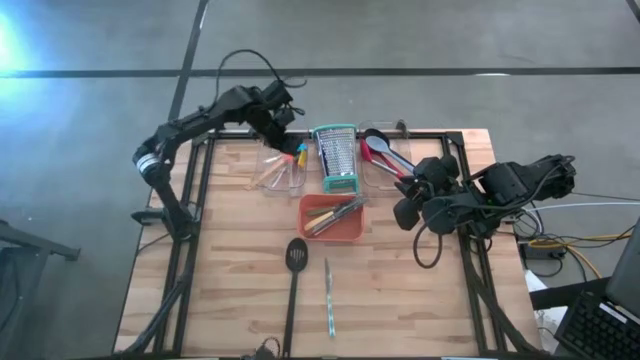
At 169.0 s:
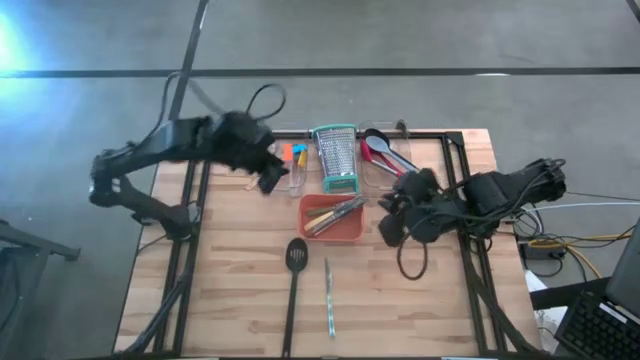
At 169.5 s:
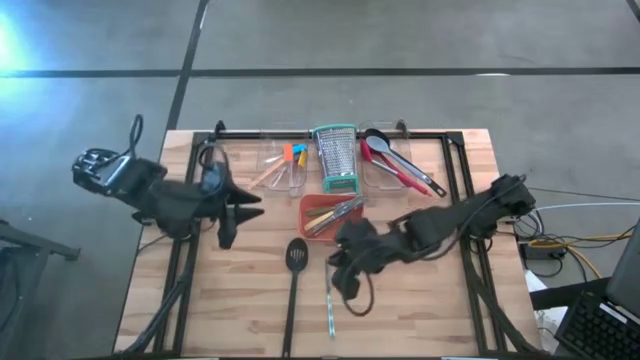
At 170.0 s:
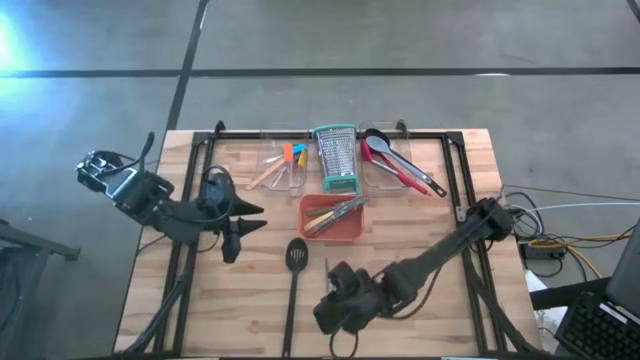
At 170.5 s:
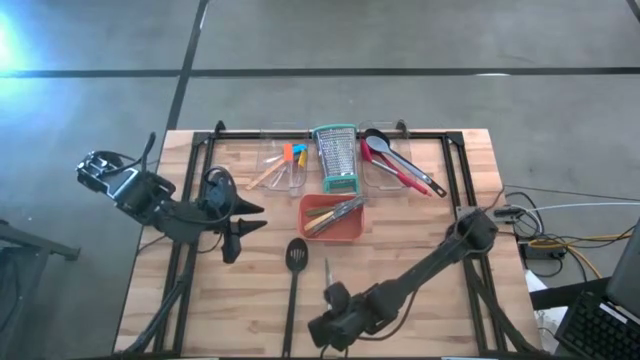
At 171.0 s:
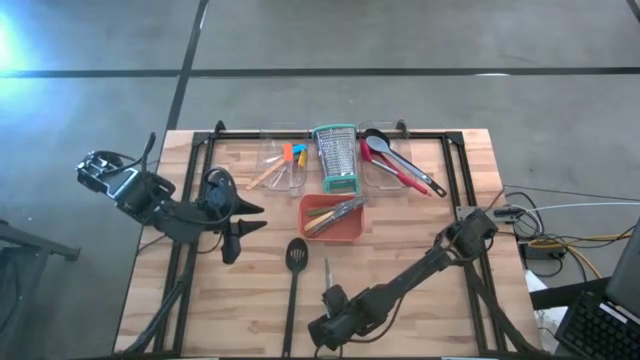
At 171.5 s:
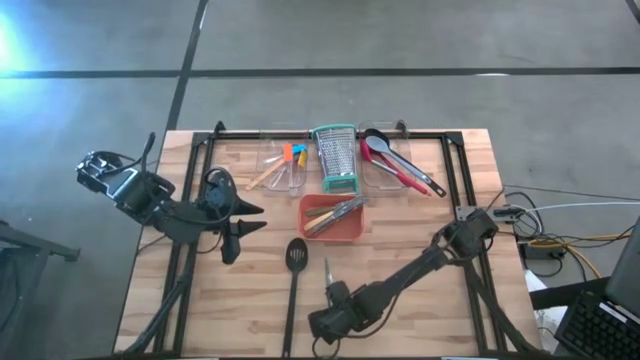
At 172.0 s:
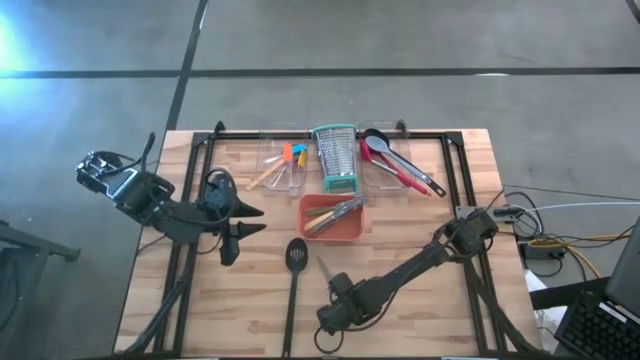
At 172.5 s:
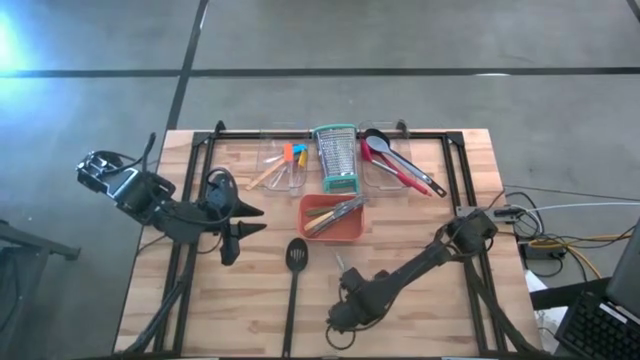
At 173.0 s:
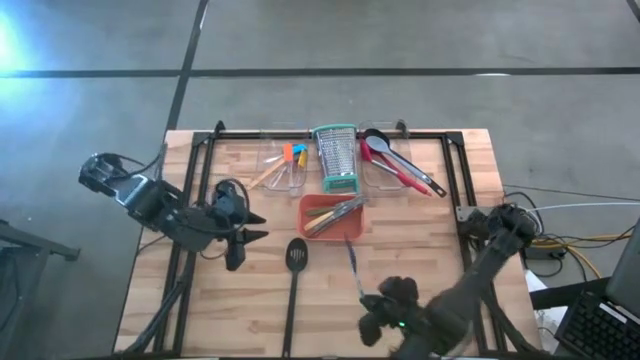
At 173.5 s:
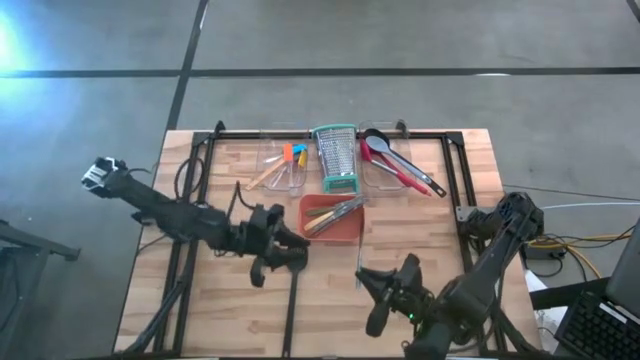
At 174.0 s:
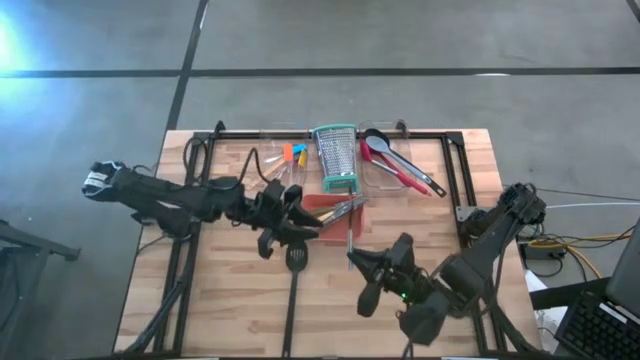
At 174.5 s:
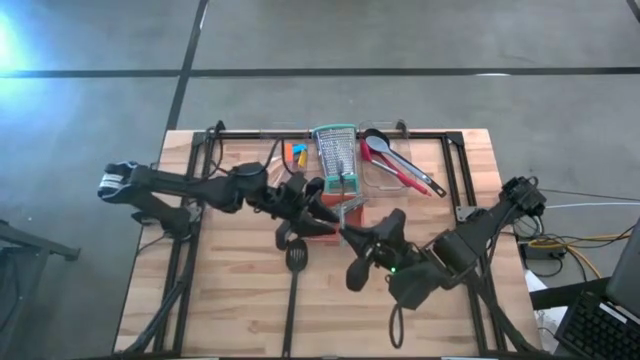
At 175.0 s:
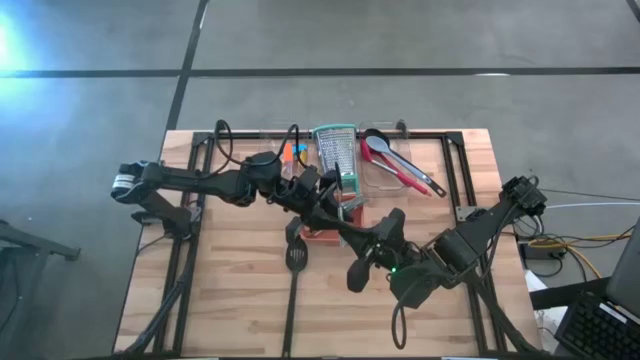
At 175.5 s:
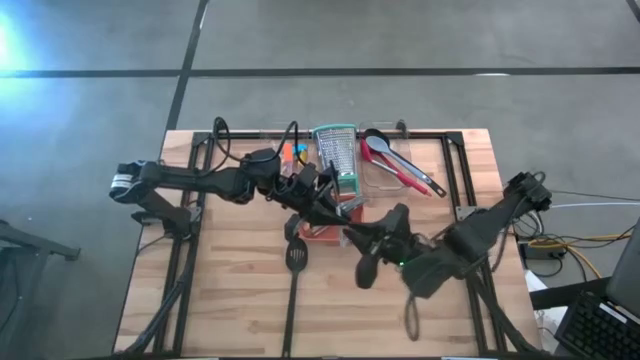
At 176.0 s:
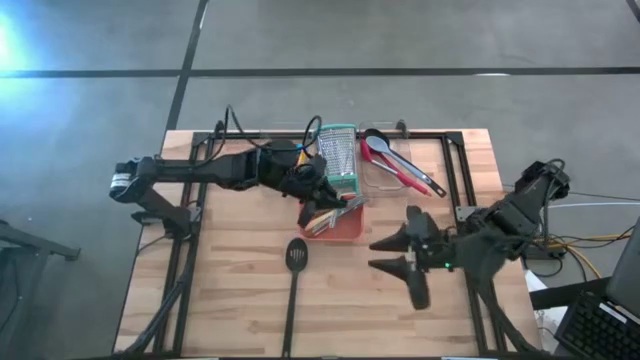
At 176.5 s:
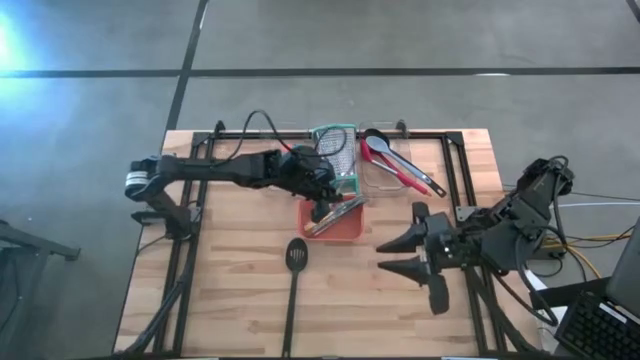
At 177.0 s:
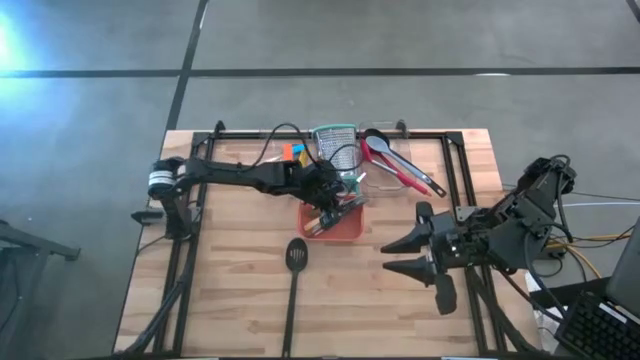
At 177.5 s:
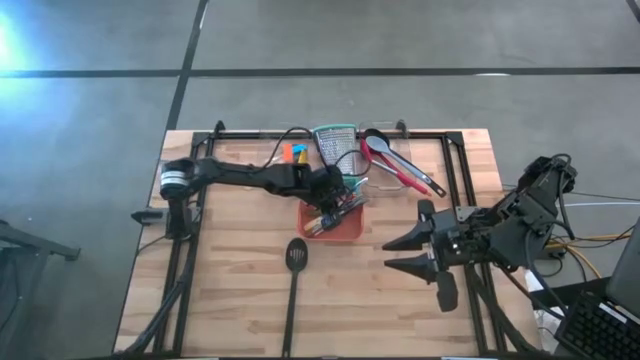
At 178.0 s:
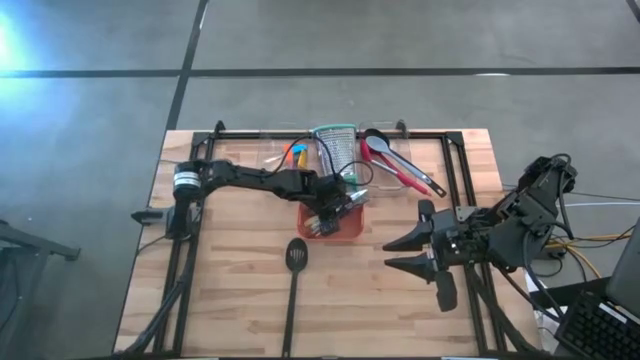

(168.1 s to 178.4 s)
Task: Pick & Place Kitchen Items
Put the blue patterned knife into the orange bin

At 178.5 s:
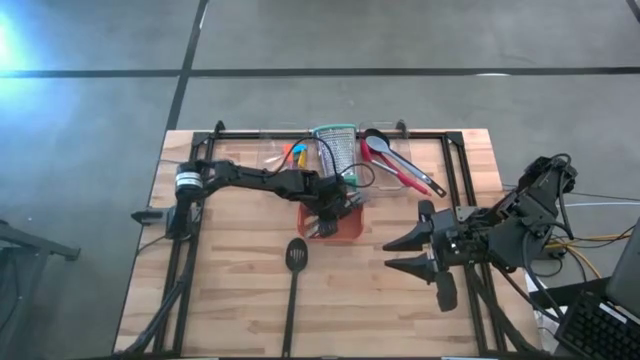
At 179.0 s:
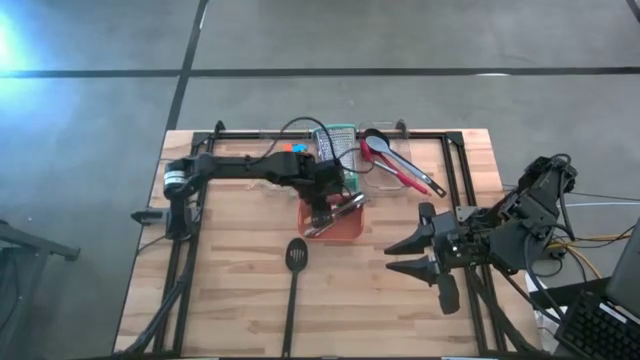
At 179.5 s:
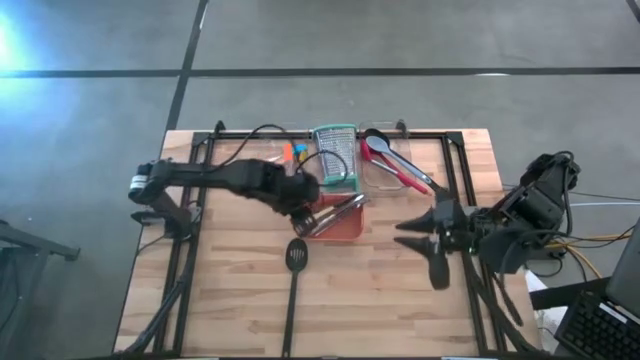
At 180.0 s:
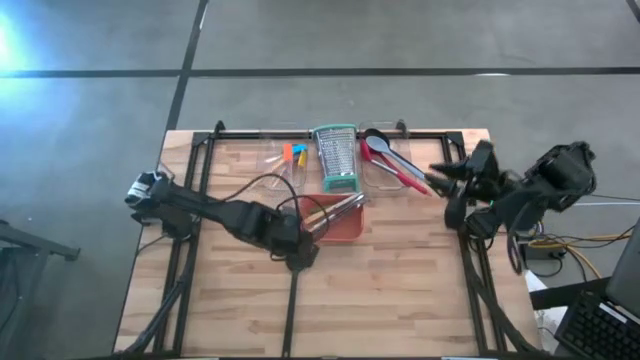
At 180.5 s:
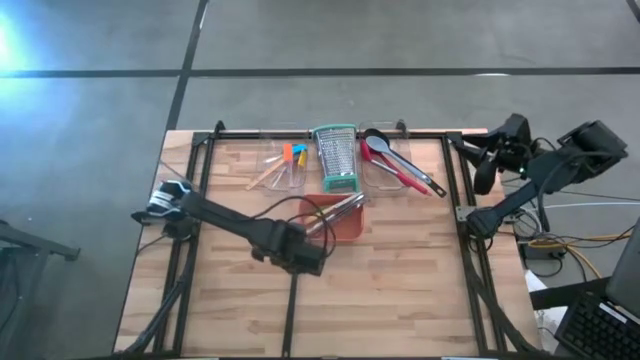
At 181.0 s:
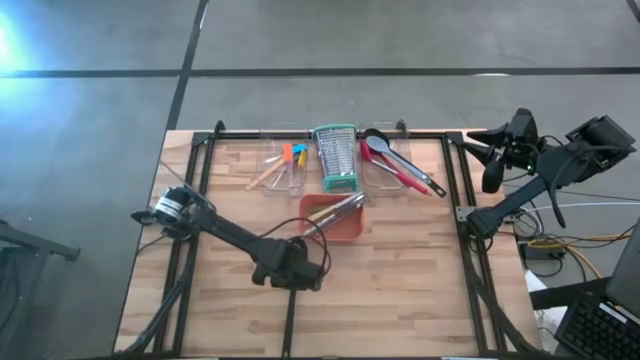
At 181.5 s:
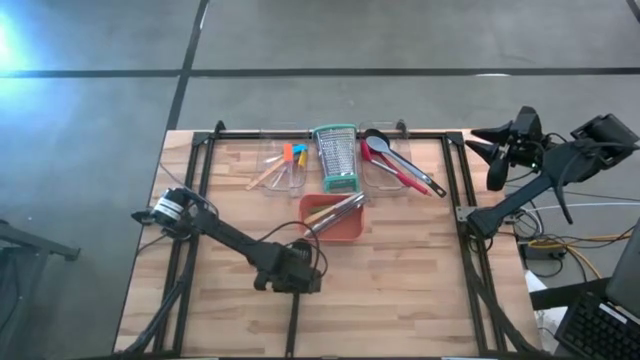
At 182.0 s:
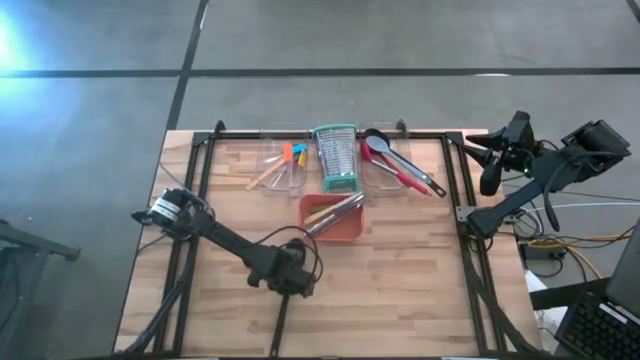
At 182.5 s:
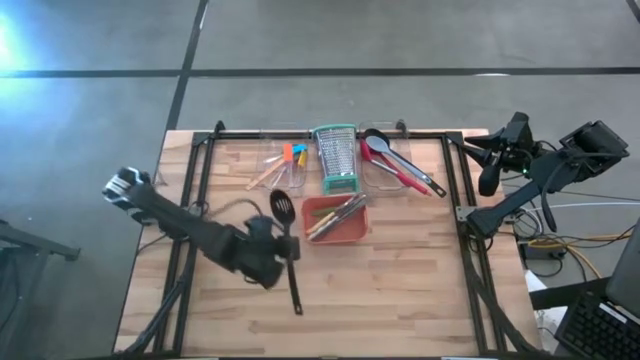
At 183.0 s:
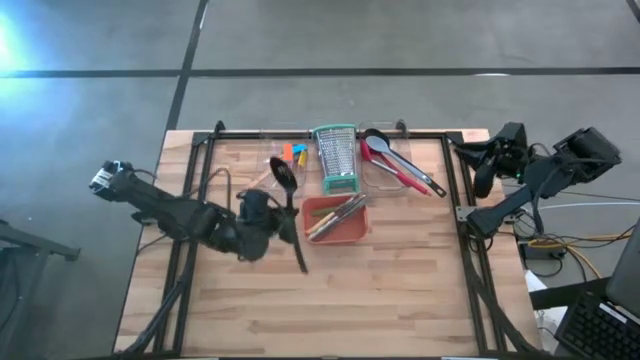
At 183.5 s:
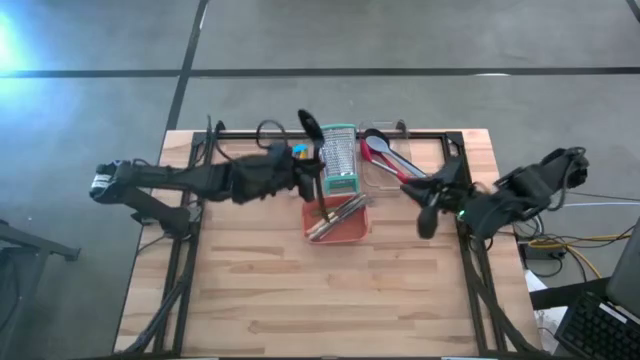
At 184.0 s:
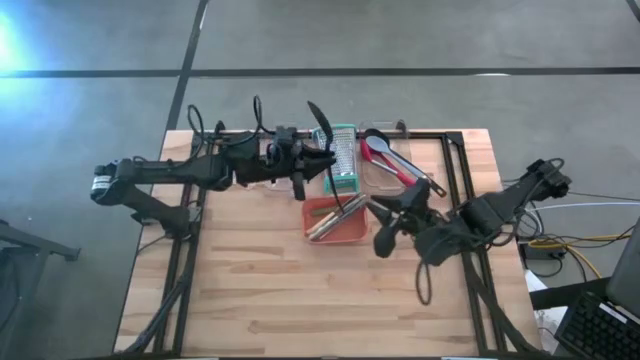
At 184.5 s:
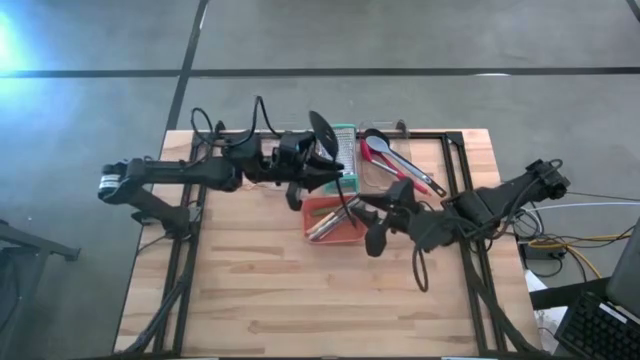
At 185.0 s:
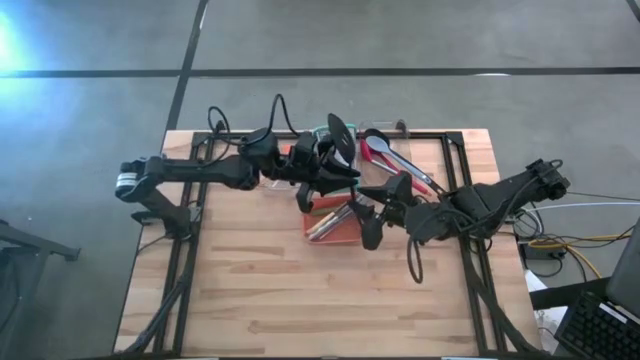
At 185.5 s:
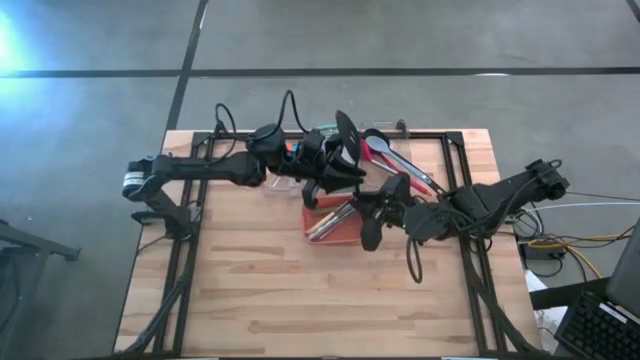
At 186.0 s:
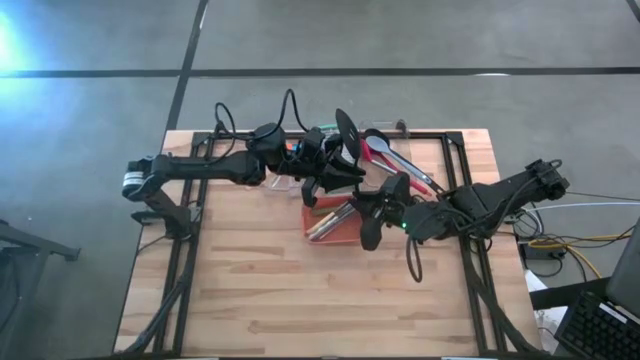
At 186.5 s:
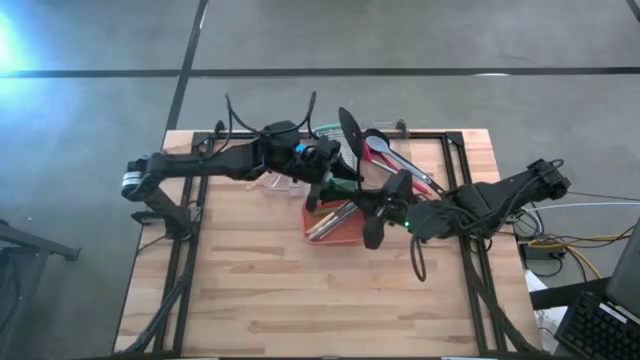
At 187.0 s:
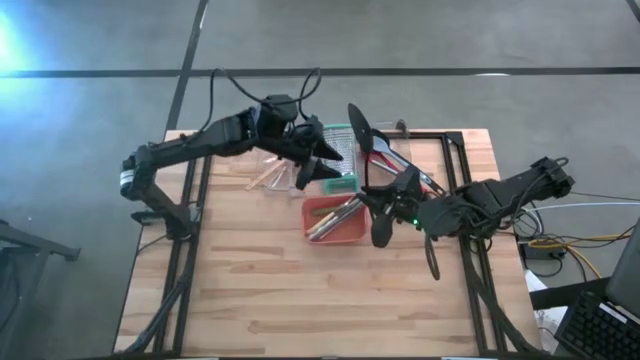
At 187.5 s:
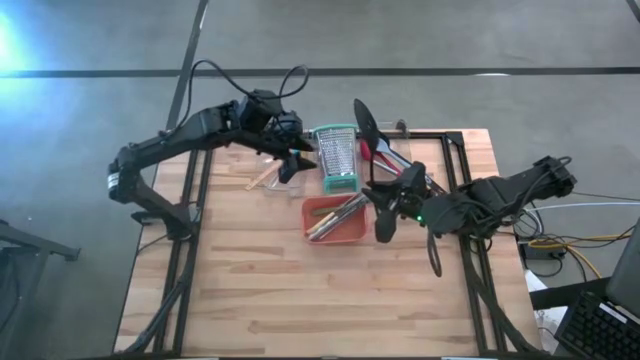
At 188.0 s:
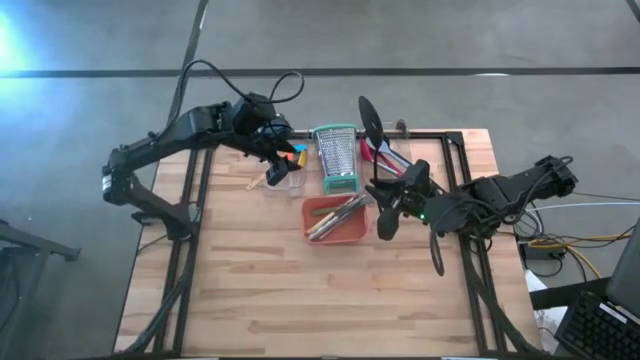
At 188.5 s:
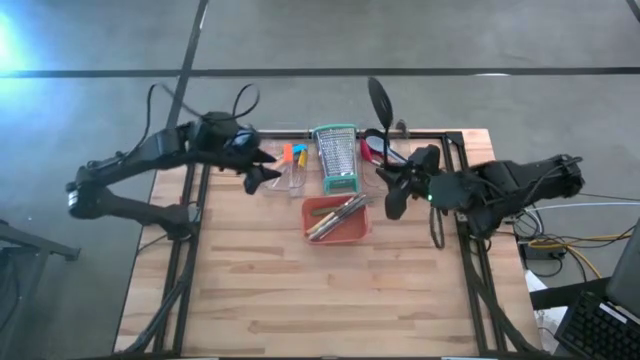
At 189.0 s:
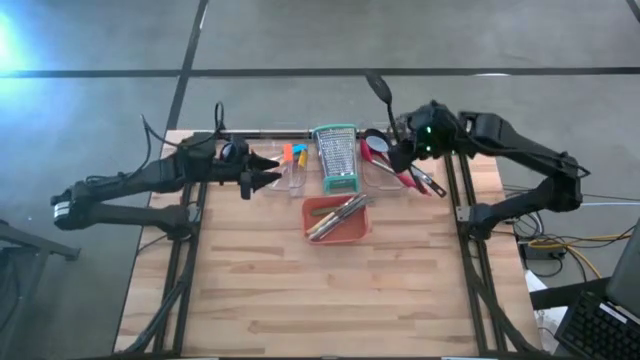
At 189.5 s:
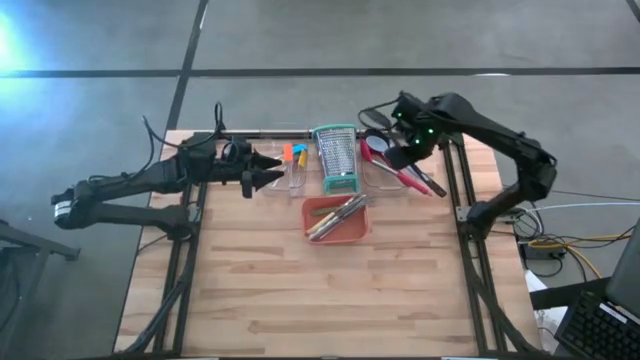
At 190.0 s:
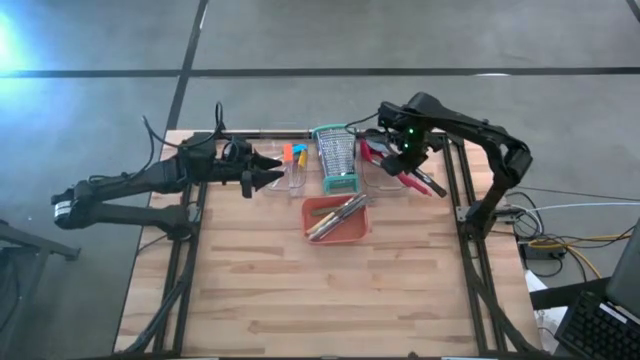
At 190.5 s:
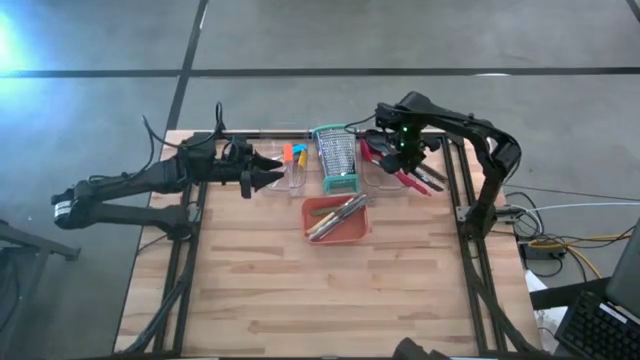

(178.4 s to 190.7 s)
Put the black slotted spoon into the right transparent bin
